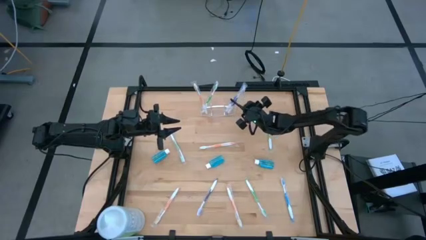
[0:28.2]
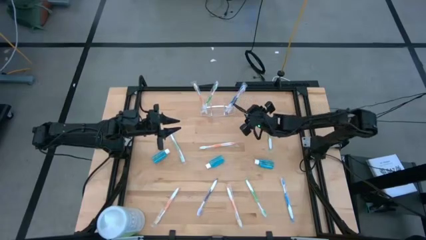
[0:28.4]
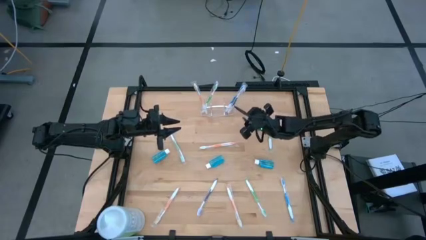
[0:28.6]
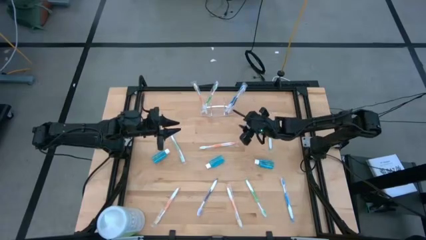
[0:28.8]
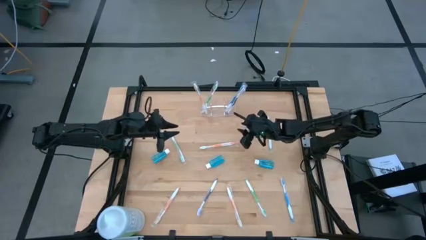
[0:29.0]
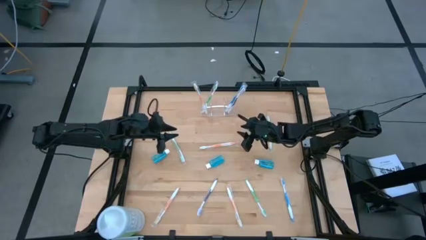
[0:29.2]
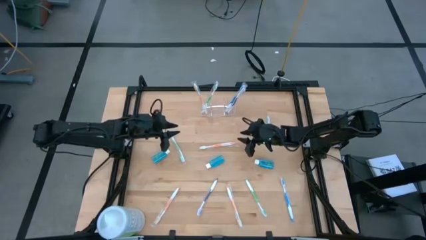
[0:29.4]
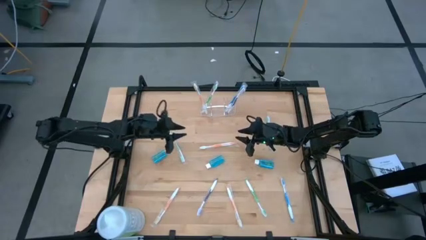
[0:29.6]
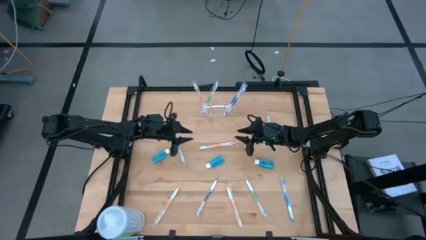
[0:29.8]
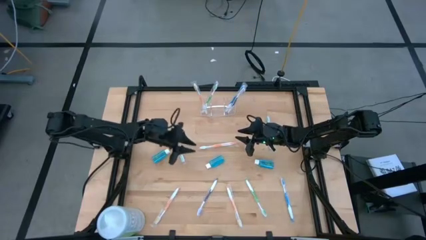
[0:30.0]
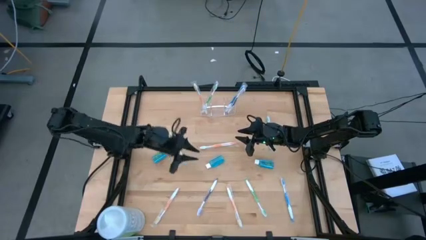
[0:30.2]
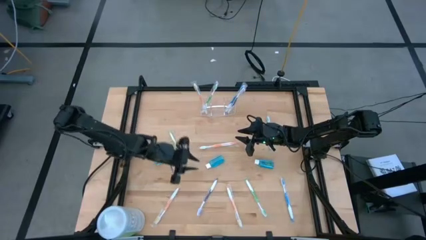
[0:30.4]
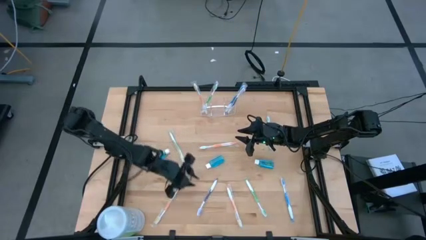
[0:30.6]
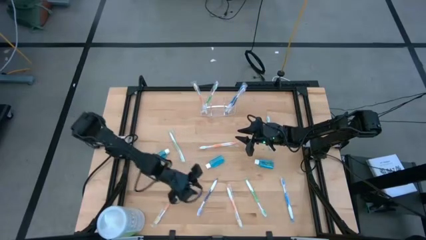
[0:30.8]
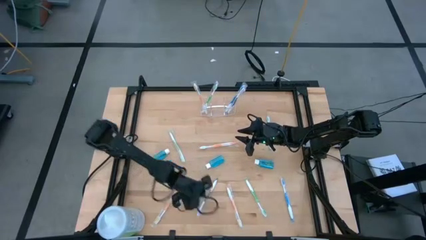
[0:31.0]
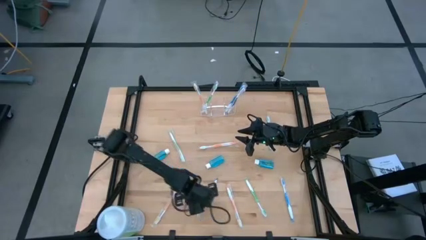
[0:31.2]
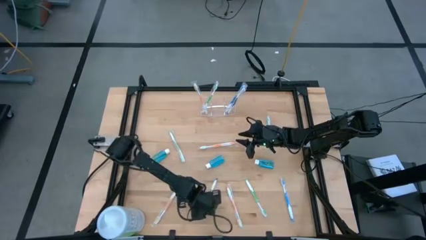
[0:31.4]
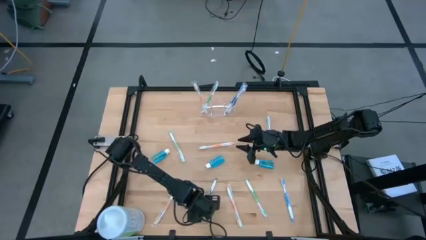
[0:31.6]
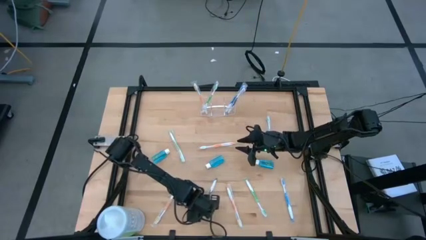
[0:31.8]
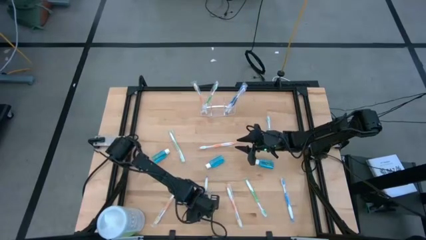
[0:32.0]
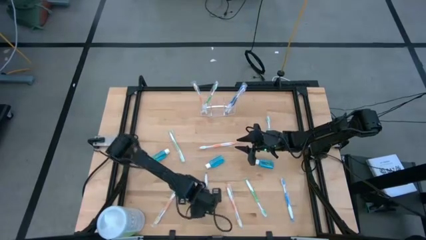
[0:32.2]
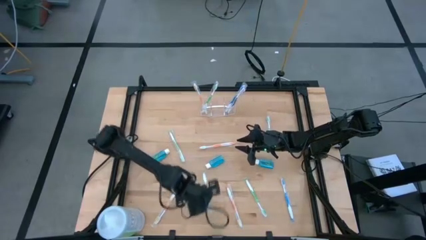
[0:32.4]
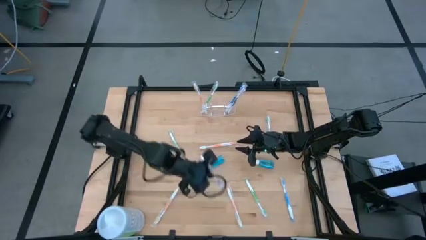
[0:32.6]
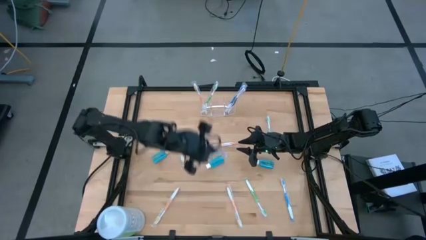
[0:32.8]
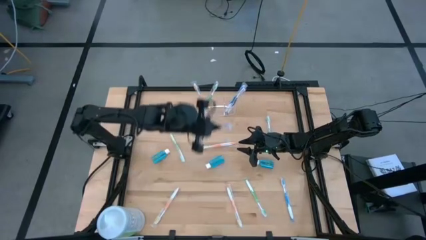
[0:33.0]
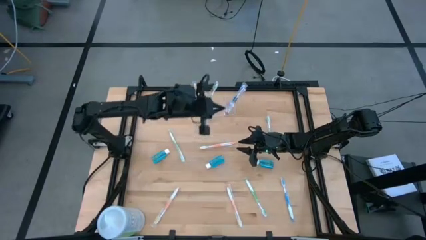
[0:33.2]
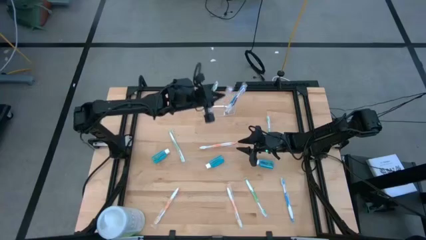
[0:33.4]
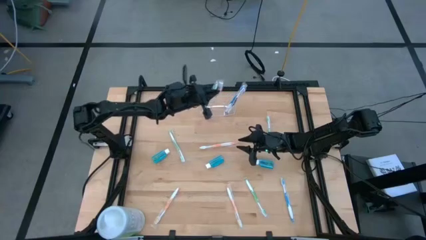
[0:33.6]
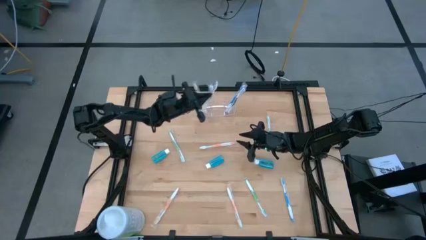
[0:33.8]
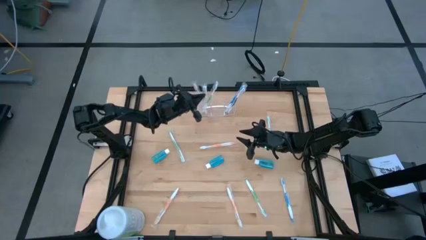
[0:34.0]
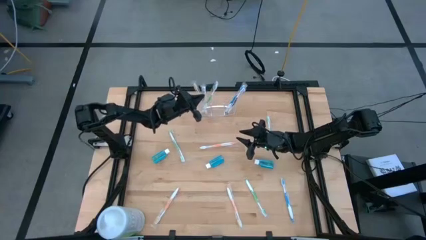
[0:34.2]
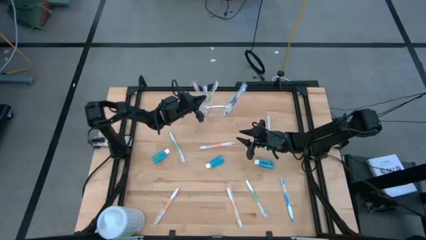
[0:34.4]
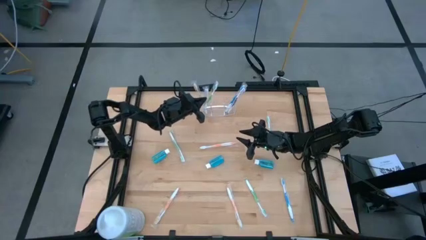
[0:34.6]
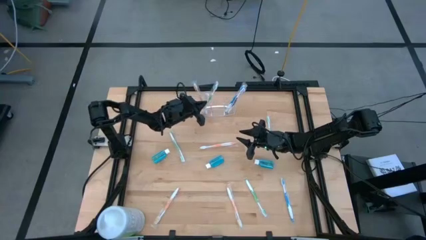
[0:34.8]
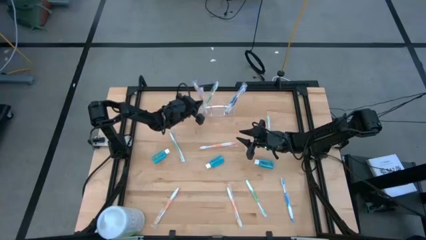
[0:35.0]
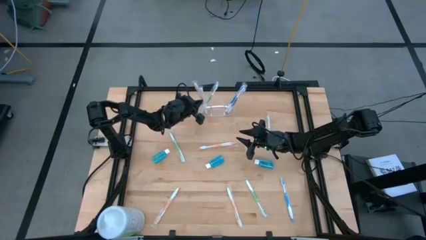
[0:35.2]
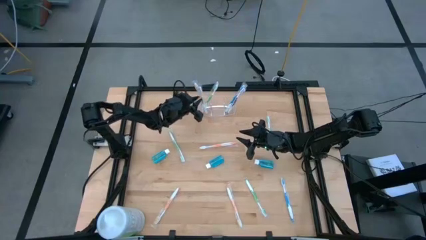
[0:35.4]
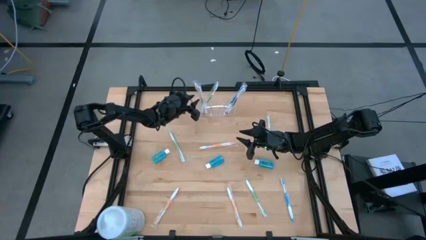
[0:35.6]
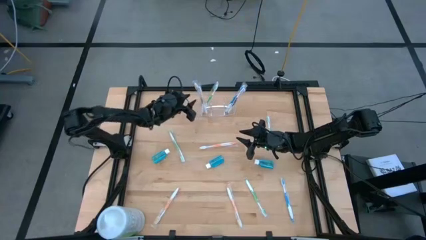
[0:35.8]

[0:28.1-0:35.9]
Task: Pick & Place toothbrushing station
Put the purple toothbrush into the transparent organizer

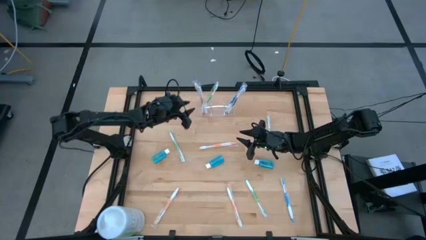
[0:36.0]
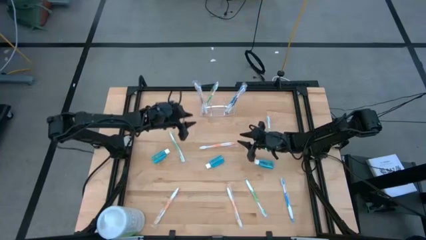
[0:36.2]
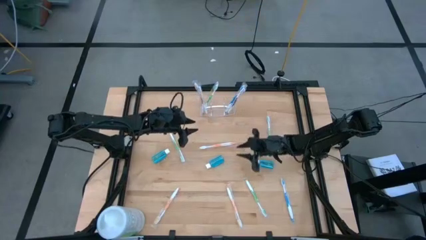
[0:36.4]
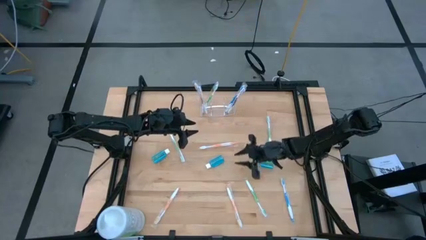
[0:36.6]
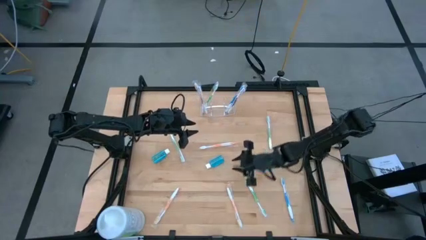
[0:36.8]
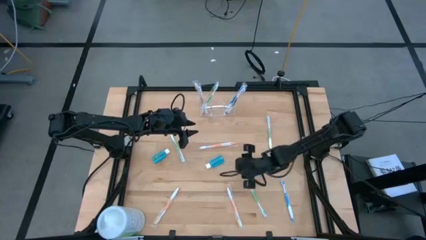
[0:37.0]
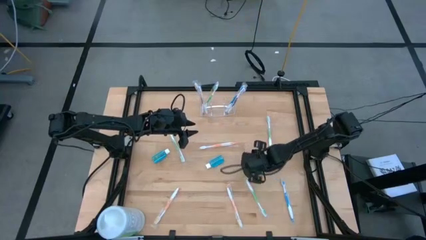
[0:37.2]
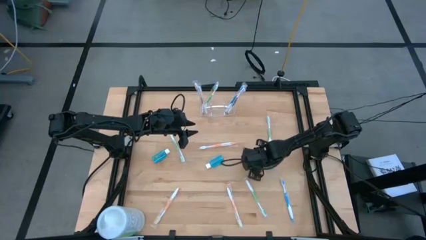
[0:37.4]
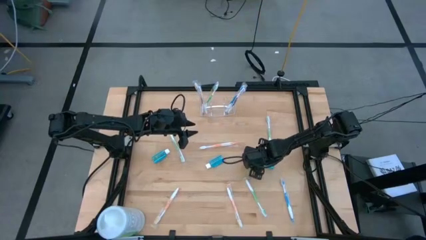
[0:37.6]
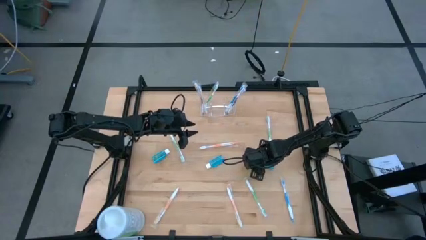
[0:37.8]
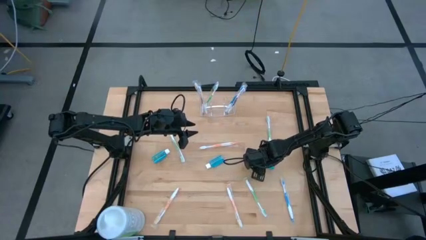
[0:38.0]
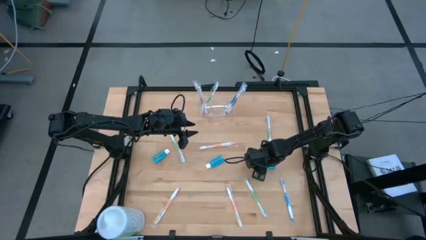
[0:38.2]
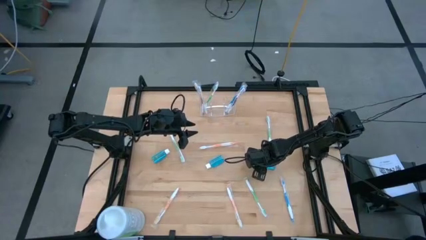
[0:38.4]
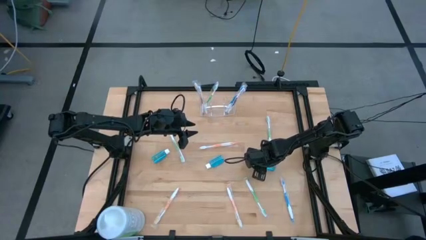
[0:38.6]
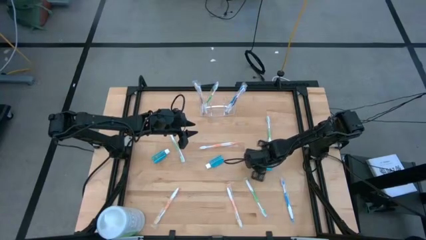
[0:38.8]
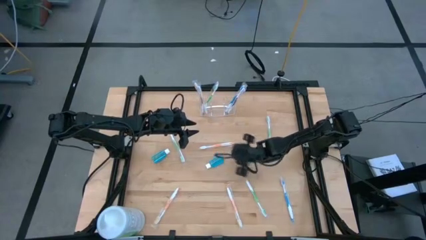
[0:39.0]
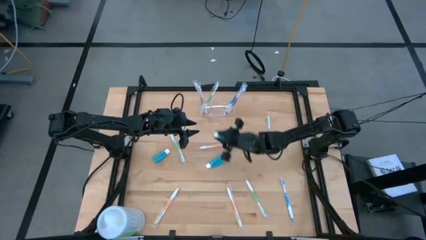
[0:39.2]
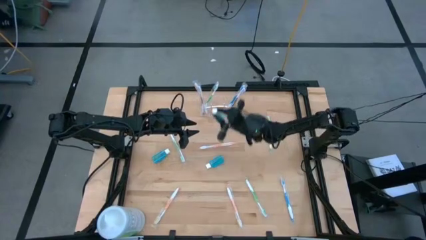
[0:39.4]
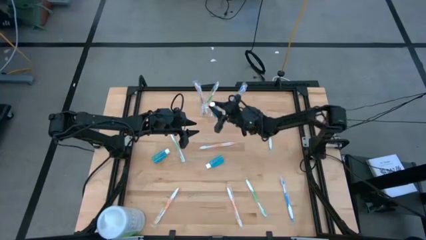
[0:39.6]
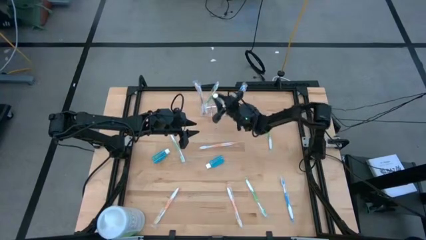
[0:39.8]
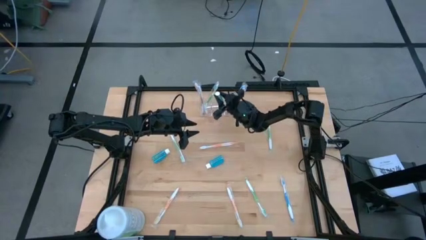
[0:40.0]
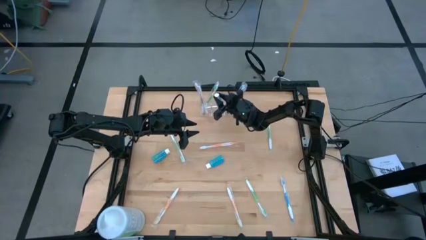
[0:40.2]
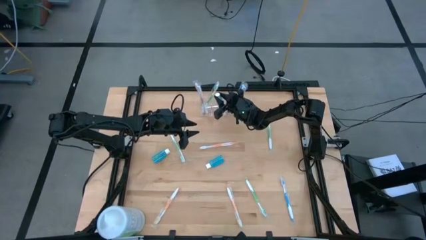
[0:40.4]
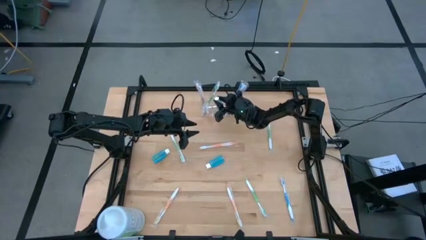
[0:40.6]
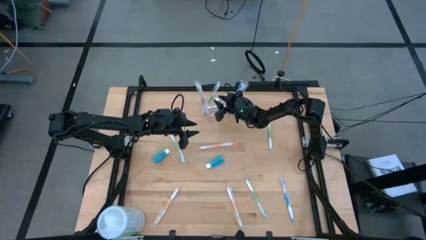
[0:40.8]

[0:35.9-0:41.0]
Put the blue mouthwash bottle into the transparent organizer

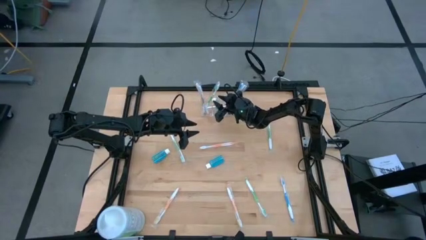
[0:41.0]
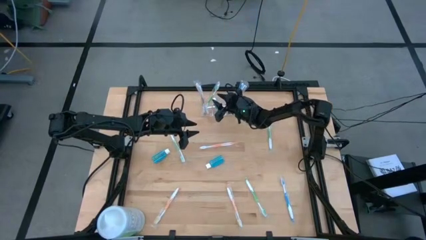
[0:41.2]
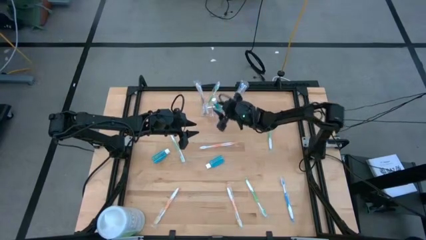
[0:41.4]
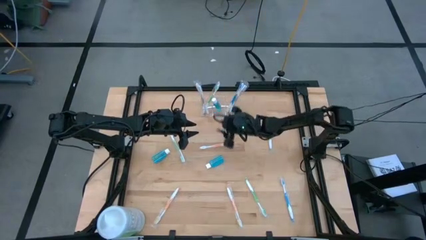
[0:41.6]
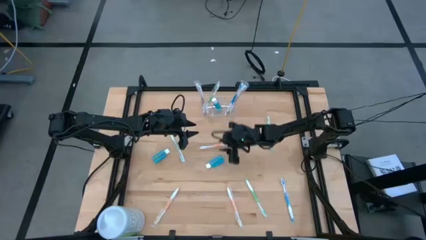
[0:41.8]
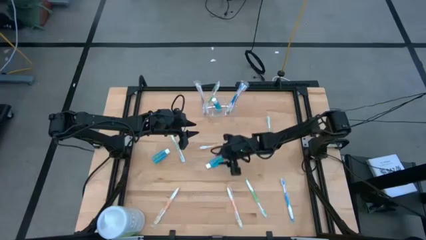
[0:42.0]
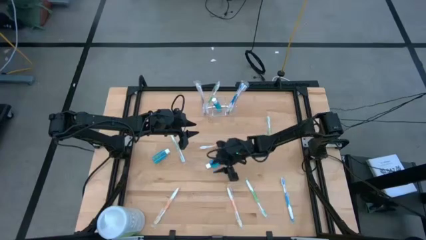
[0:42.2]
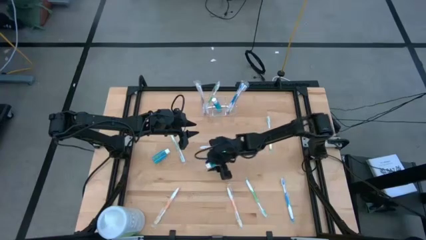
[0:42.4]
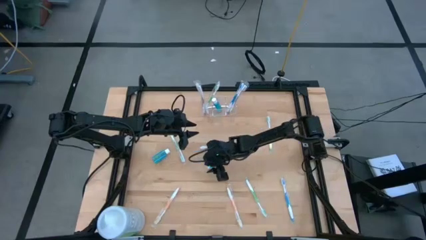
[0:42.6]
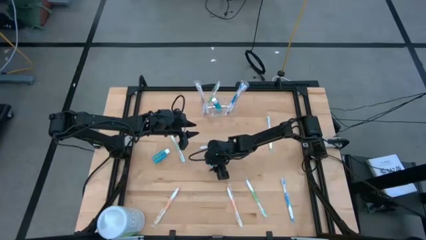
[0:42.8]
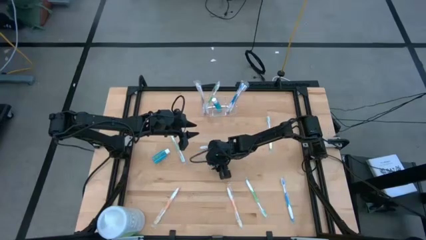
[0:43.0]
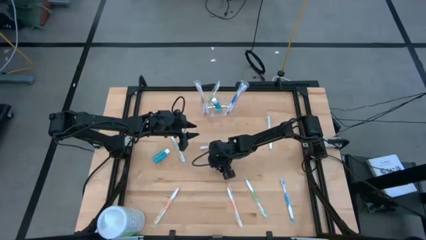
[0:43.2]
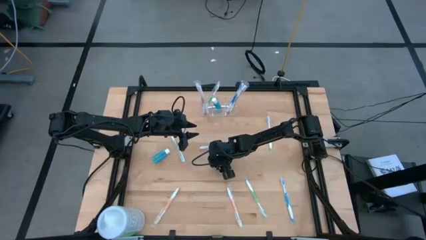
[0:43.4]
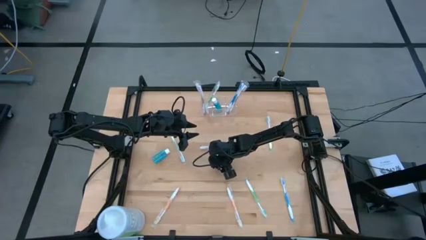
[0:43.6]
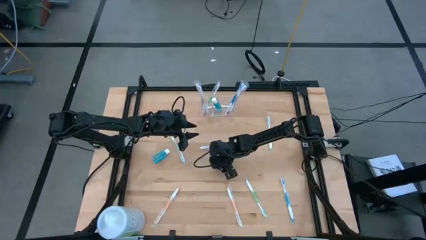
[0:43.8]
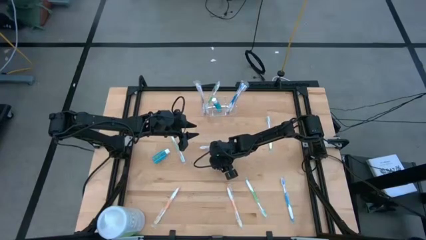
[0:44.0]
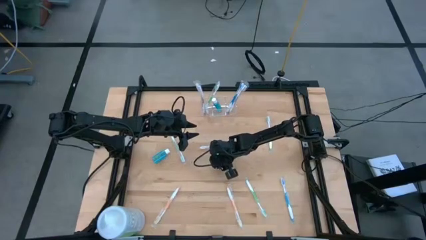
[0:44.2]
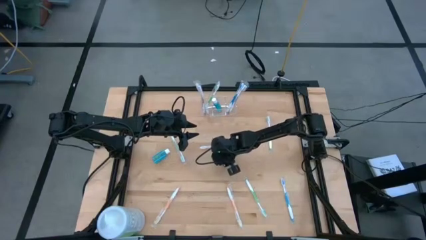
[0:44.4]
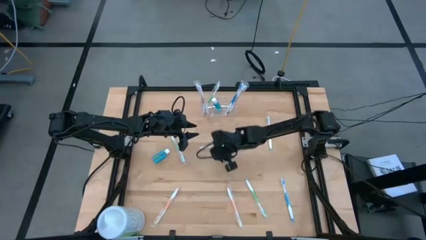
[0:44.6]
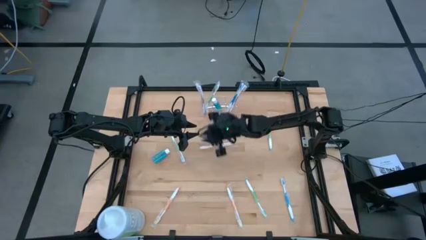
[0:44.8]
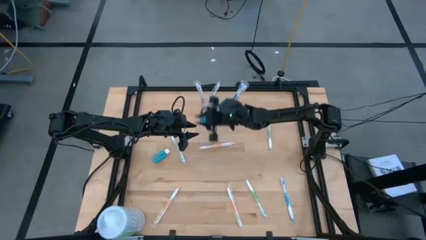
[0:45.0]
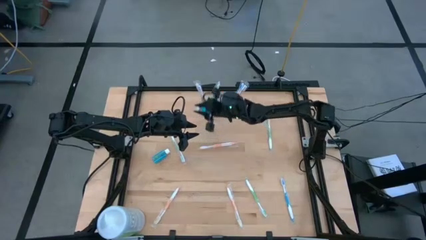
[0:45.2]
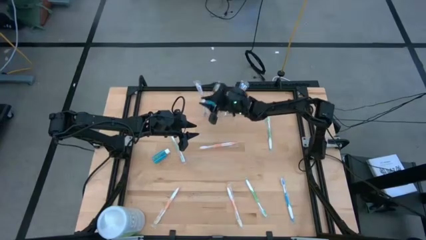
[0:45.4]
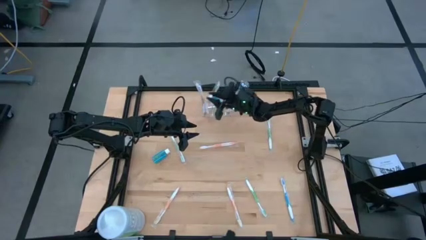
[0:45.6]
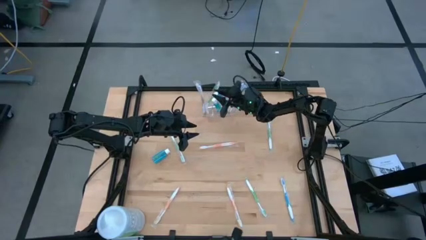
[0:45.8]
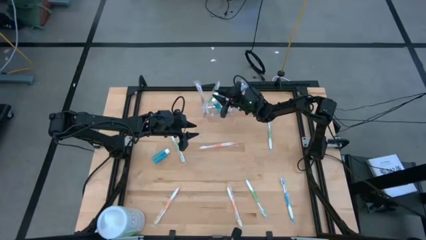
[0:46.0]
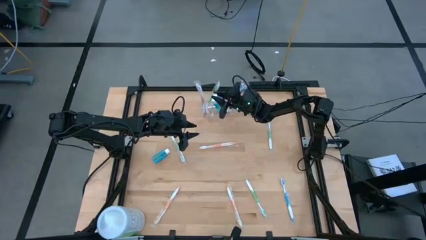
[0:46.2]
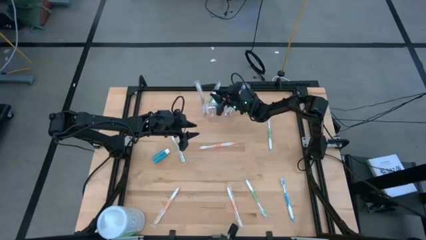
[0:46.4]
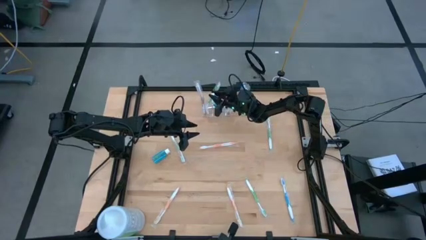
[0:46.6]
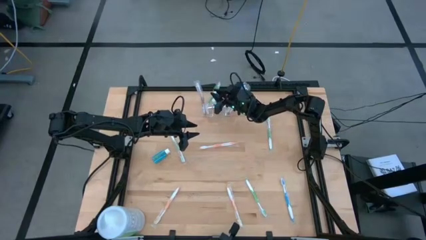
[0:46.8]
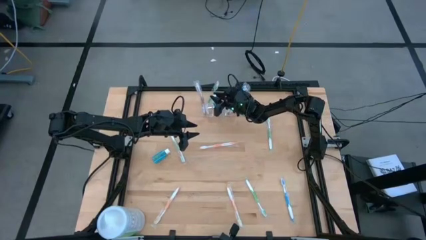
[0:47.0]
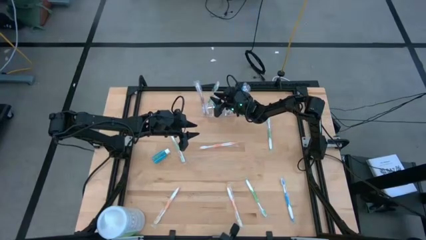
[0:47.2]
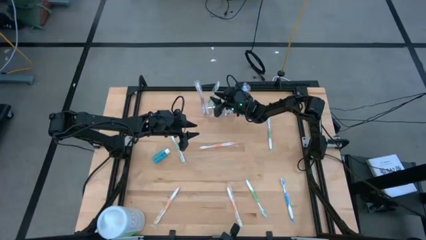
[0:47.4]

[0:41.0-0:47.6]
Put the blue mouthwash bottle into the transparent organizer
